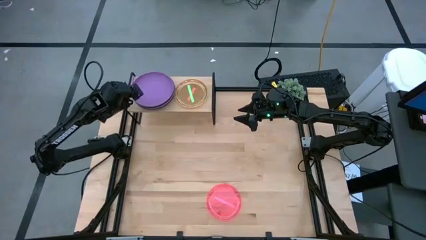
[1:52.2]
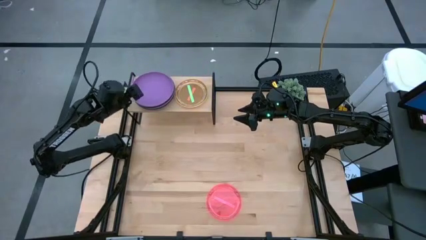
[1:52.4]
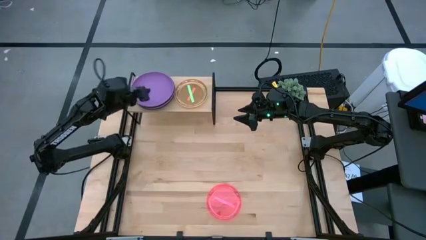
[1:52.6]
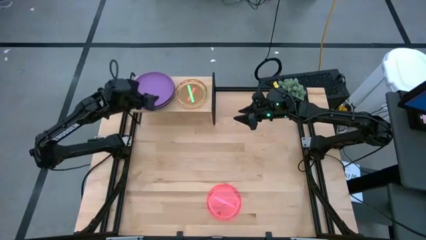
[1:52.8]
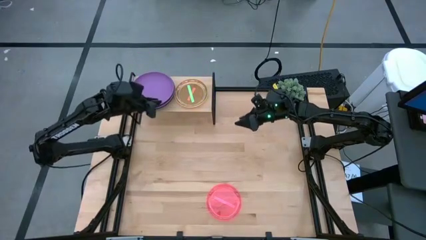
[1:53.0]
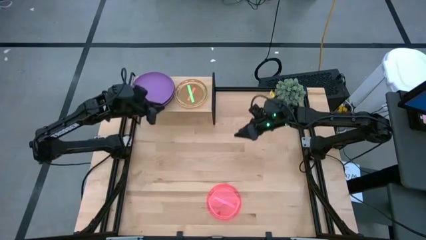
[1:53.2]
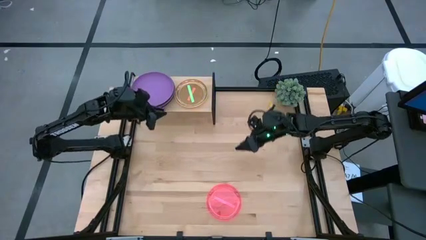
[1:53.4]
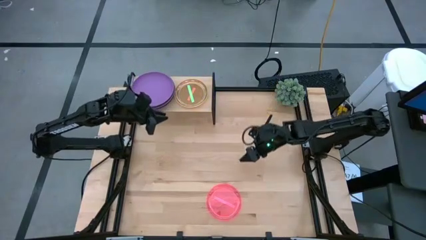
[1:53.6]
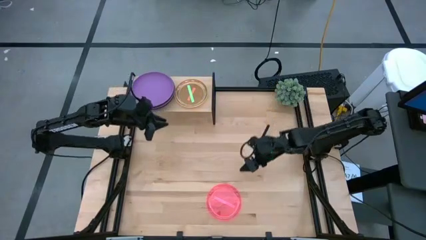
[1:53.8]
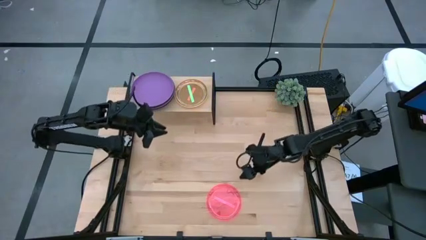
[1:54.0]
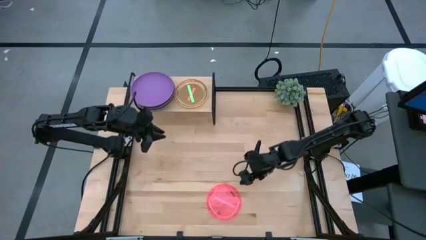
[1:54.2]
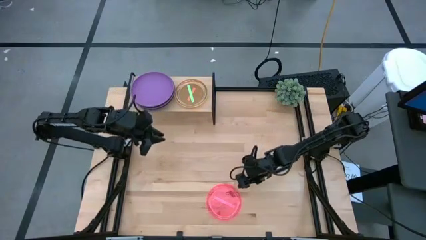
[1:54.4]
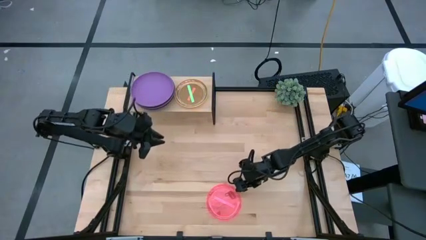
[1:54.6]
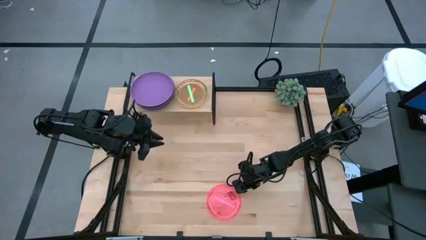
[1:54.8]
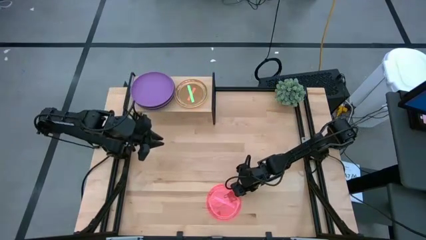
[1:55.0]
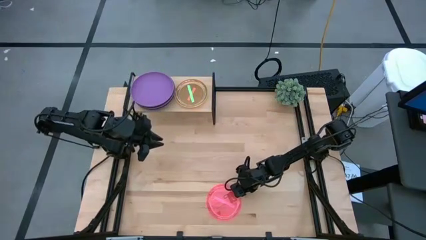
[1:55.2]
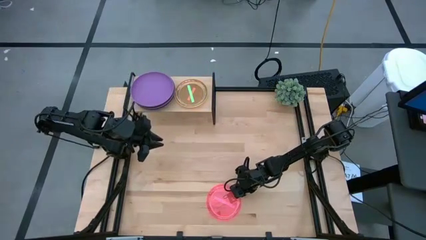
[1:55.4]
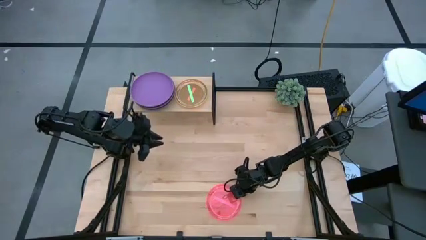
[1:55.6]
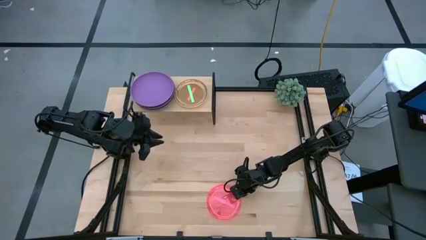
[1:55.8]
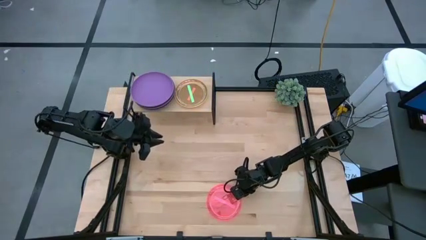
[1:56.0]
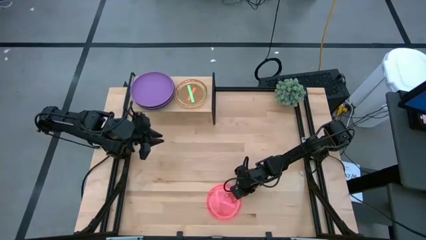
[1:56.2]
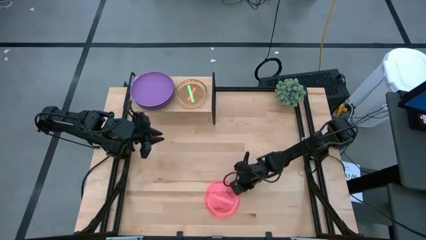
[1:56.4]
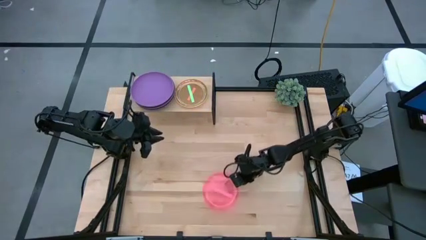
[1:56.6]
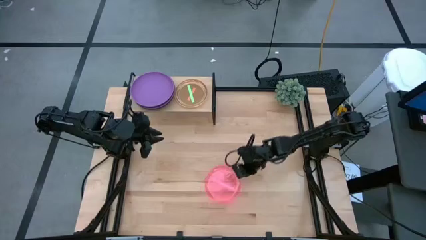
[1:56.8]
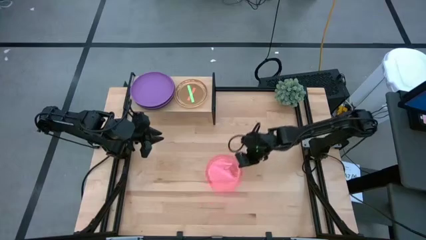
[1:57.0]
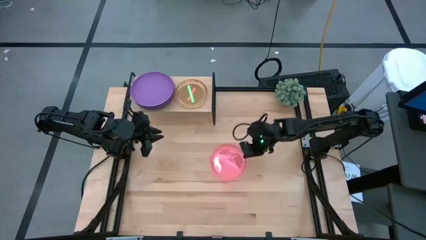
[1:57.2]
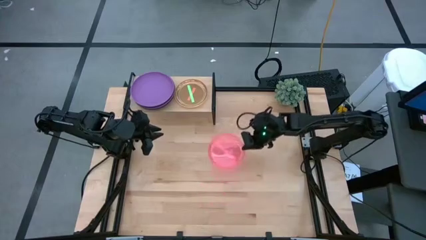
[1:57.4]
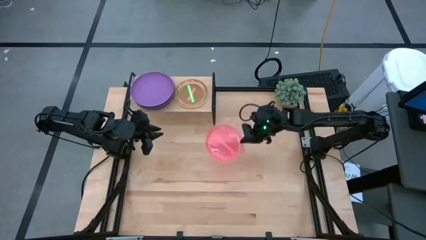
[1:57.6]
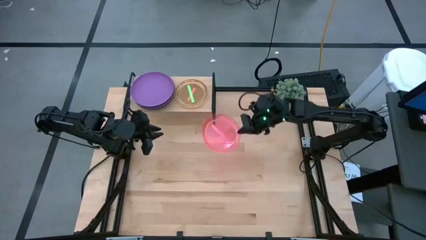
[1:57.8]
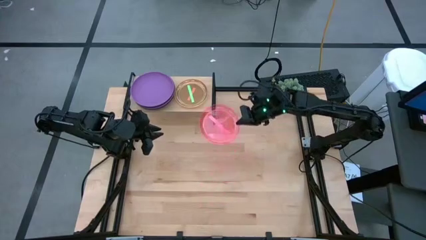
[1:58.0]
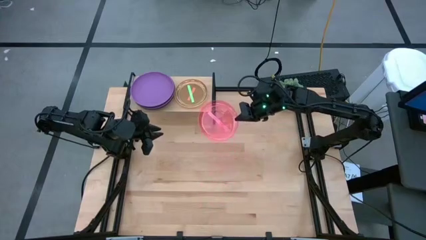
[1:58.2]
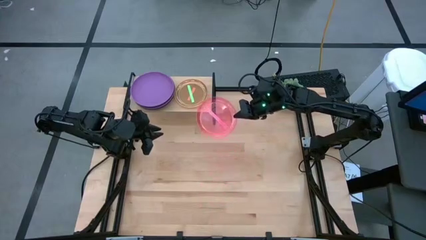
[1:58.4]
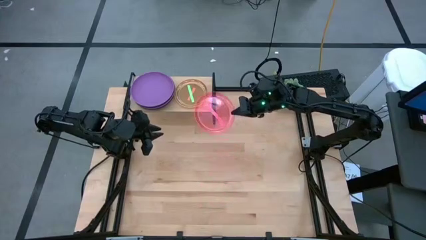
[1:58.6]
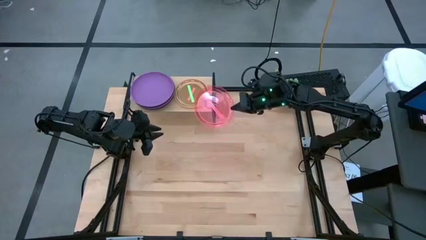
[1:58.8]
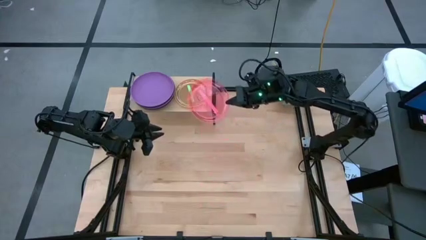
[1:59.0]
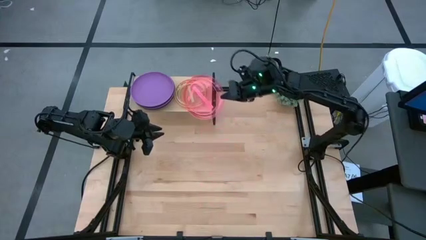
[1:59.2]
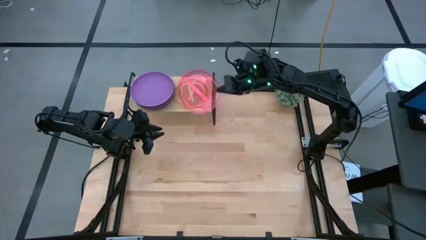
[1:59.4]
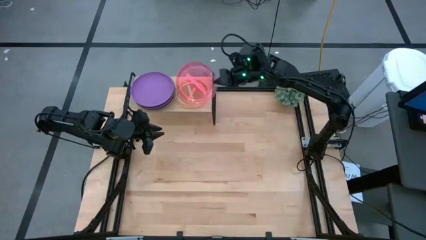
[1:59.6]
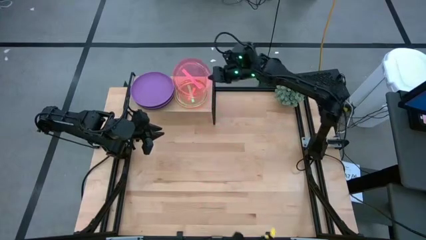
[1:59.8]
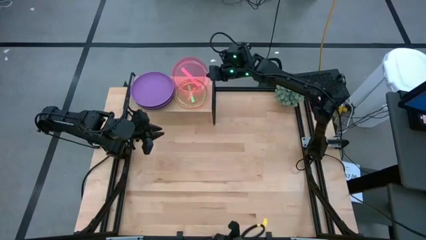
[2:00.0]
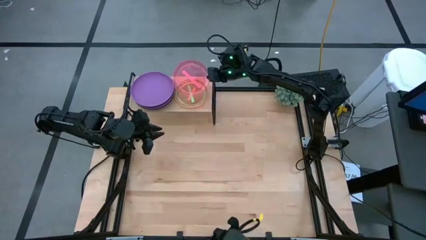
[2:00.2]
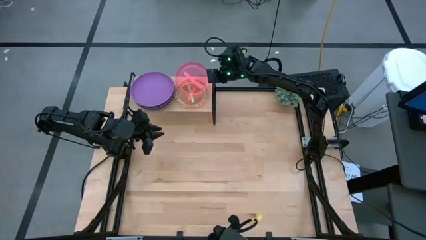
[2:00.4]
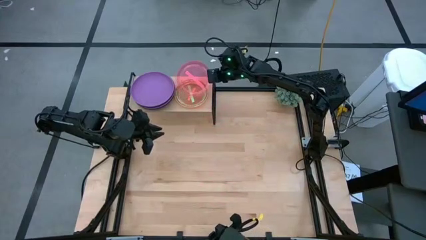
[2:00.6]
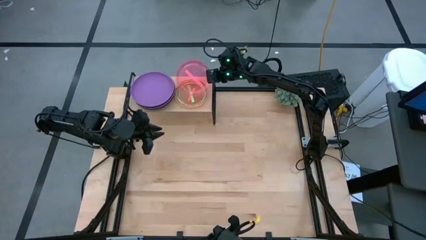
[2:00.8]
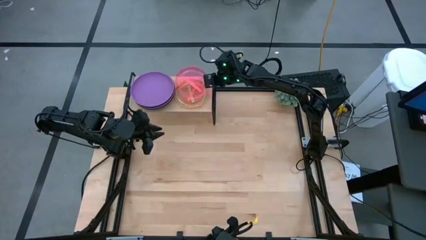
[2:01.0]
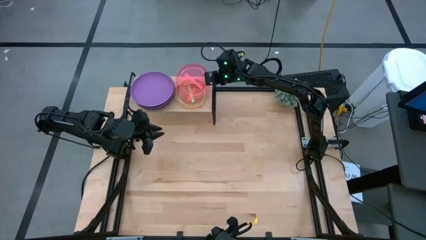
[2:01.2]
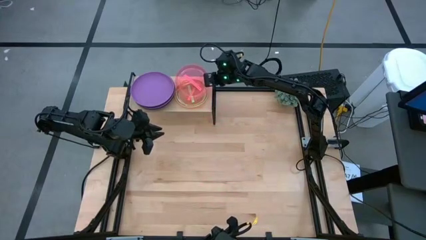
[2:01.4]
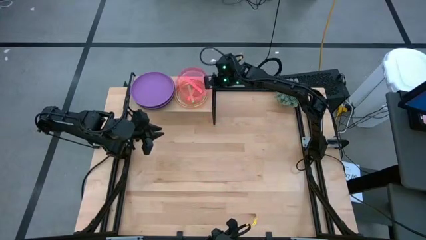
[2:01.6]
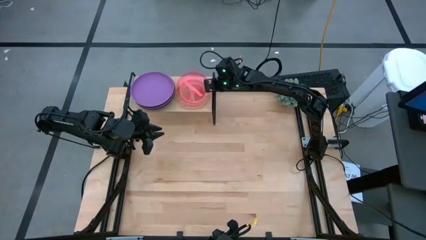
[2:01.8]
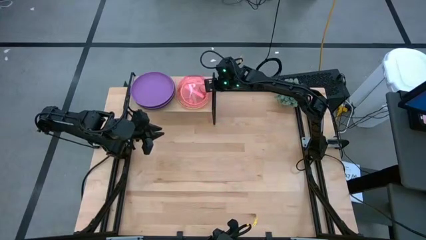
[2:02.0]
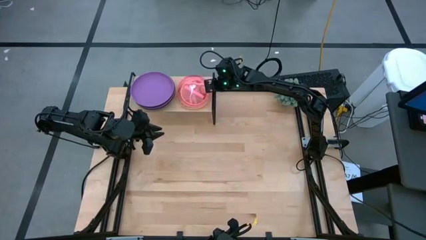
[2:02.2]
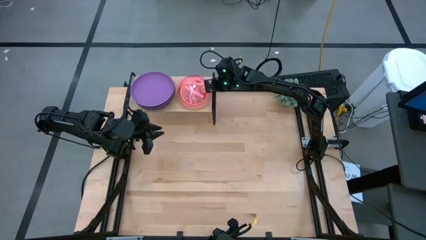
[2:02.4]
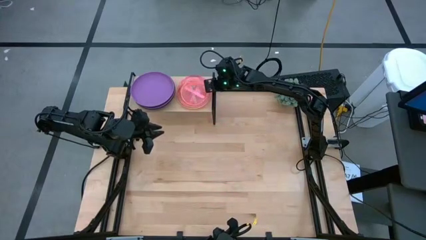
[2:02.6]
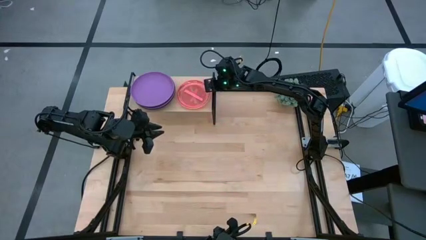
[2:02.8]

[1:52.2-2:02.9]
Task: Place and stack plates onto a shelf
Stack the pink plate on the green plate

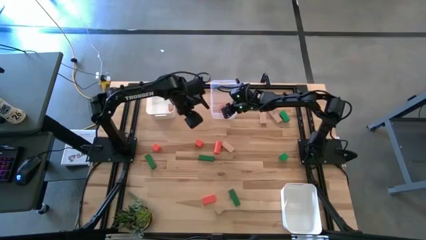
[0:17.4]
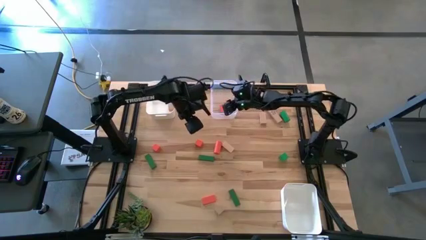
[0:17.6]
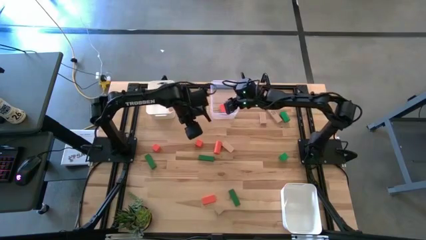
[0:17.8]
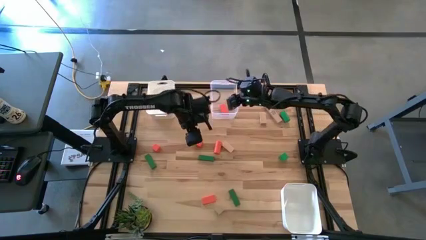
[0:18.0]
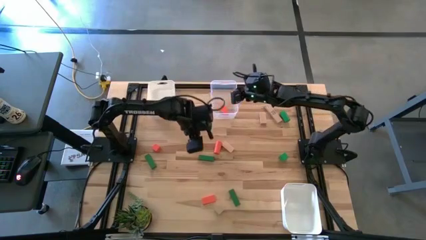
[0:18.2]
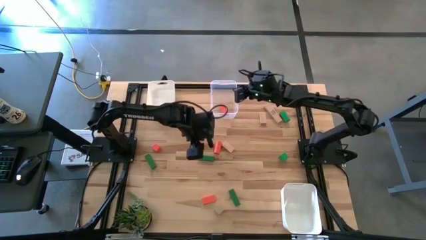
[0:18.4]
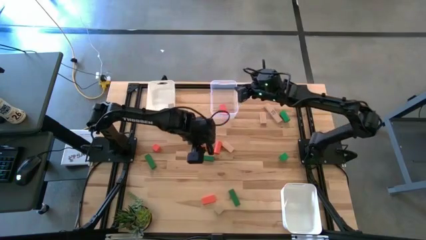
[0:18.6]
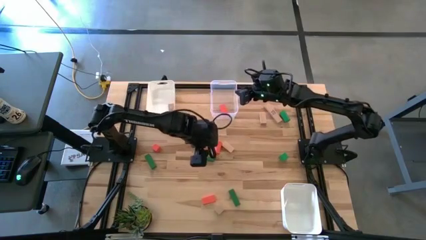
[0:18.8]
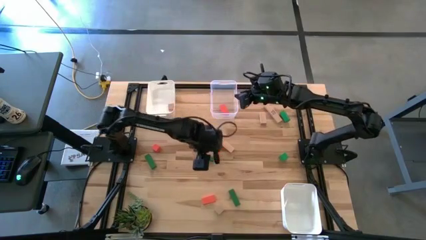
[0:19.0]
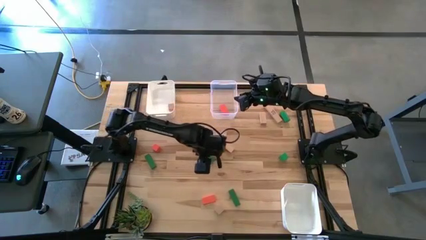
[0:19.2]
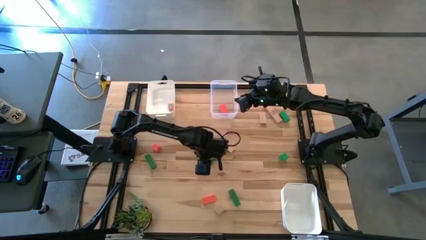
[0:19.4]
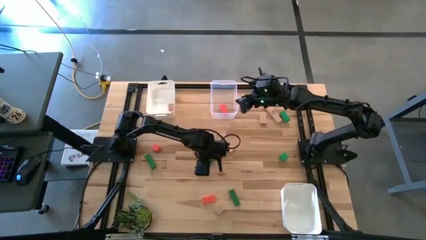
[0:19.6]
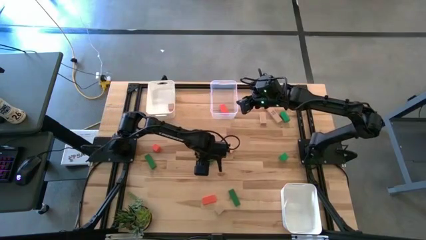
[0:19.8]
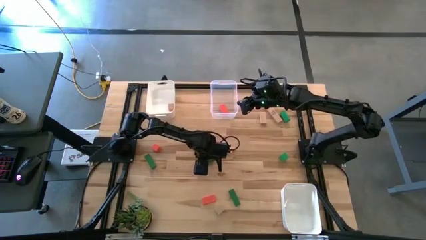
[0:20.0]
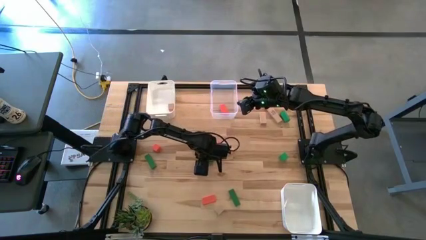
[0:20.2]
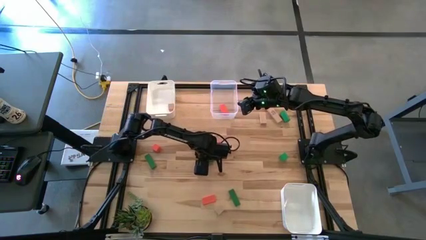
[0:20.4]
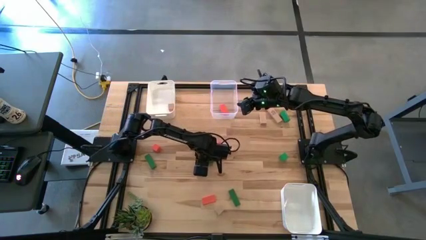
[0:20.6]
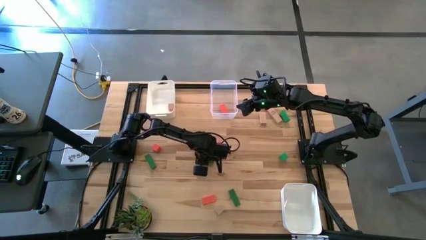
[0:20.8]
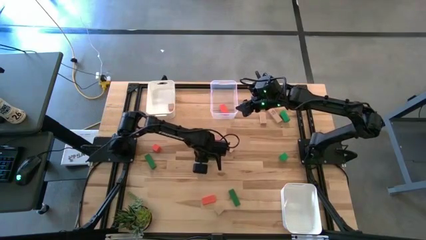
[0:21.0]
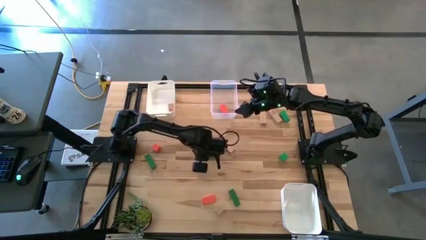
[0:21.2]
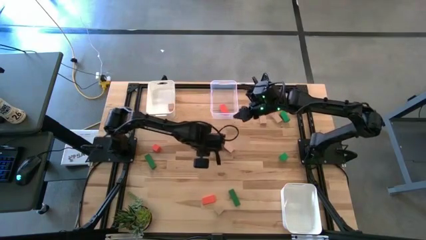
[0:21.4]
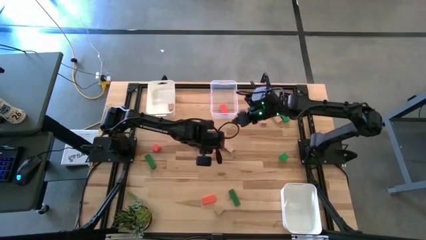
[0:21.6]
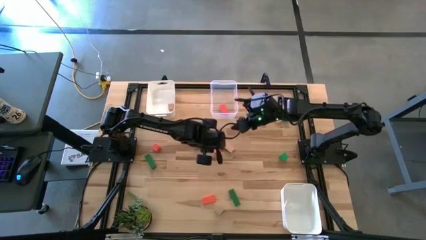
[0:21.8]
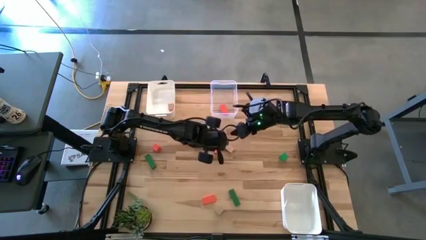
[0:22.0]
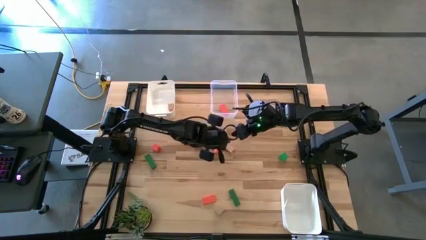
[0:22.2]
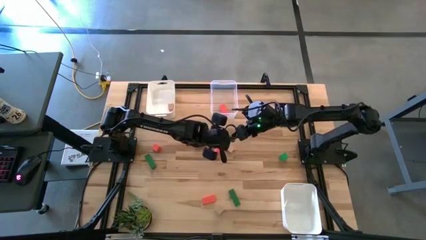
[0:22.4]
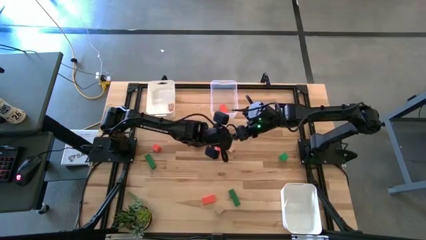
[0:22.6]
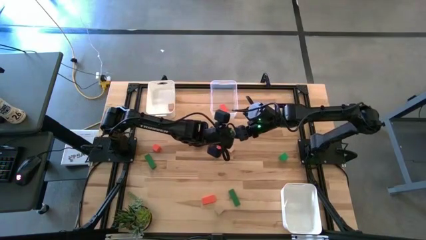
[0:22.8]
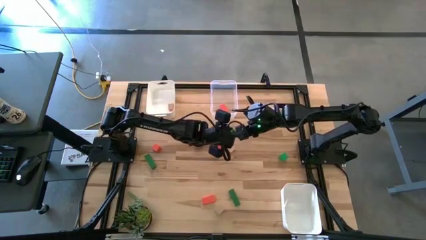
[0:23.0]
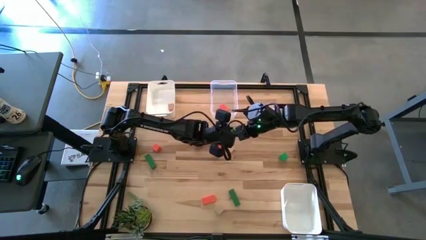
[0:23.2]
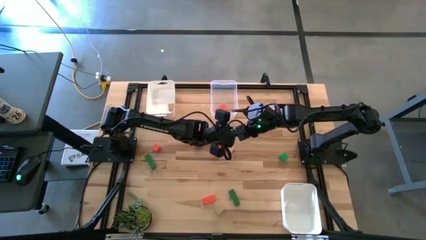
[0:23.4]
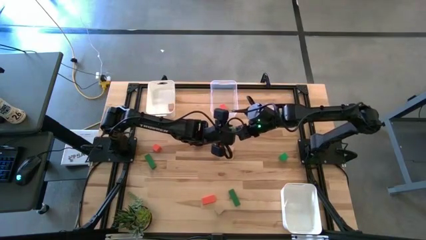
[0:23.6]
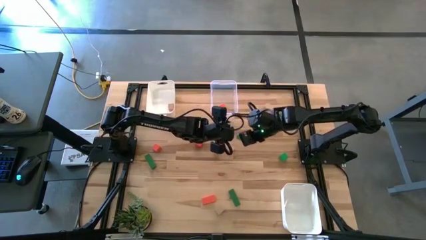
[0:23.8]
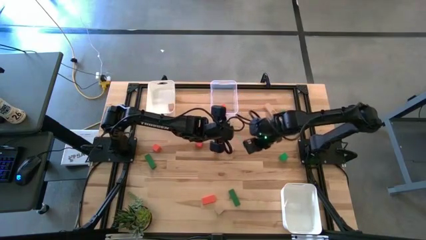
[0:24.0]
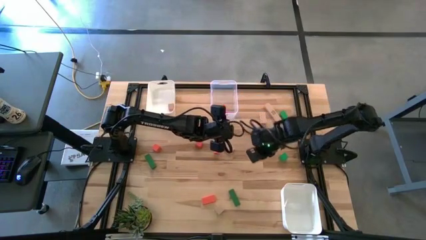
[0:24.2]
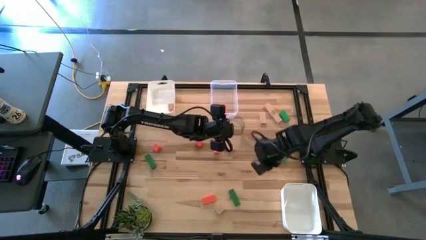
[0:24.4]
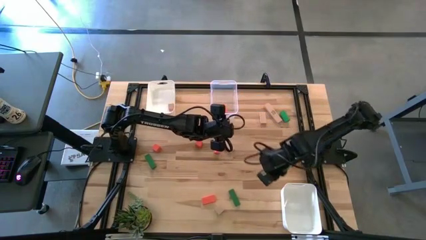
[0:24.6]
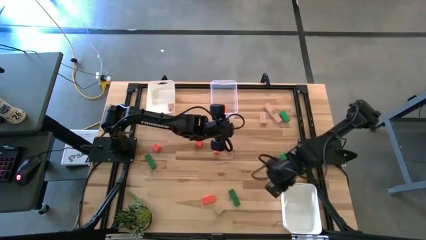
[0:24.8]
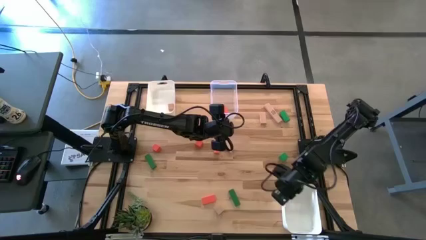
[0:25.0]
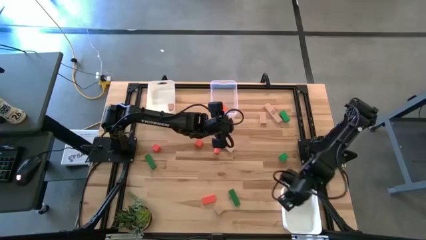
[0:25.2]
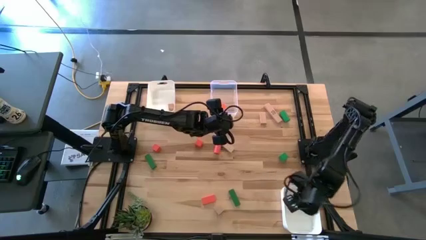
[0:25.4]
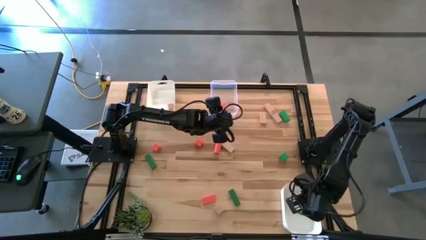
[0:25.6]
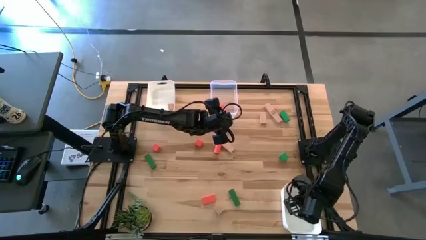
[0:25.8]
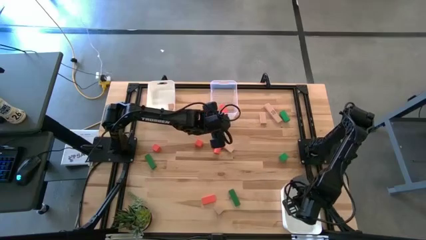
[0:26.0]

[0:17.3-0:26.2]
Task: Sort & place blocks by color
Put the green block into the bottom white bin
